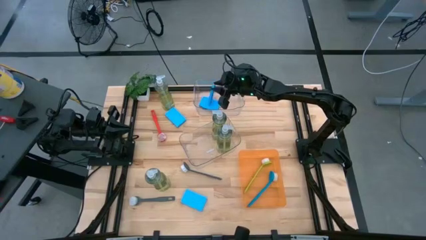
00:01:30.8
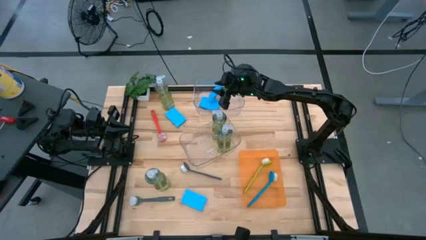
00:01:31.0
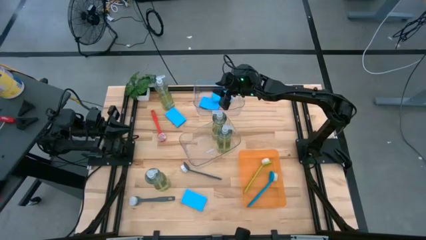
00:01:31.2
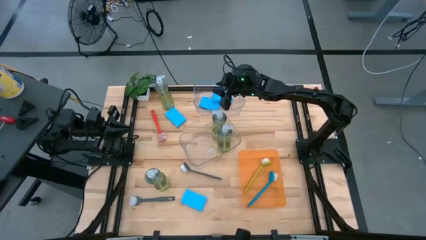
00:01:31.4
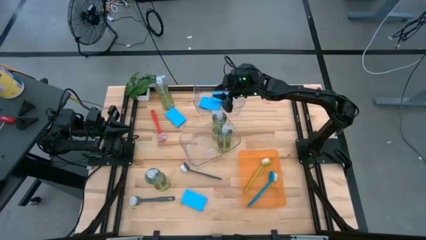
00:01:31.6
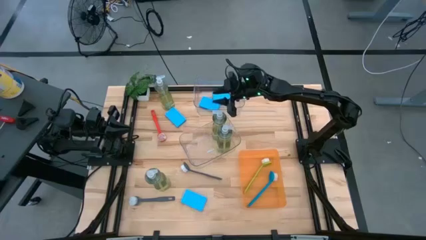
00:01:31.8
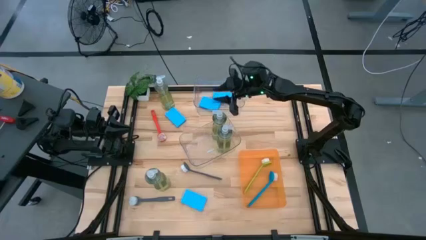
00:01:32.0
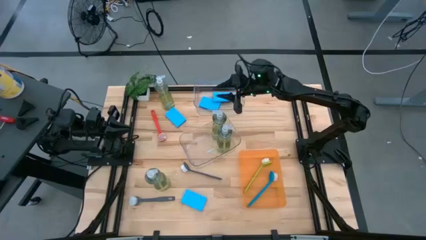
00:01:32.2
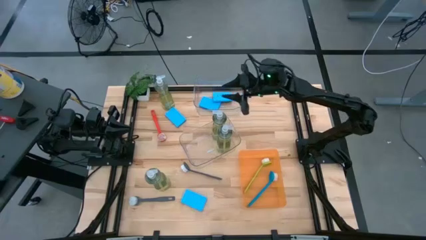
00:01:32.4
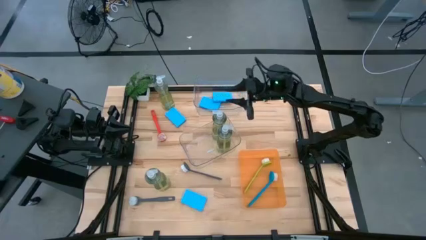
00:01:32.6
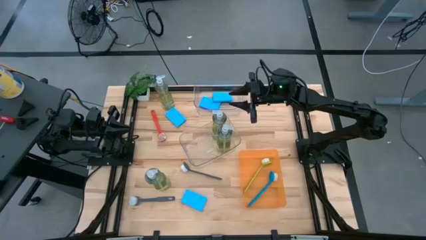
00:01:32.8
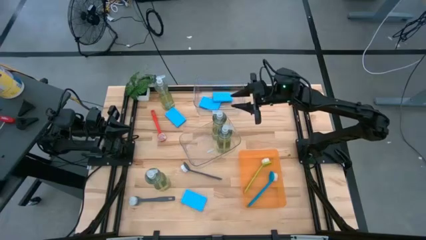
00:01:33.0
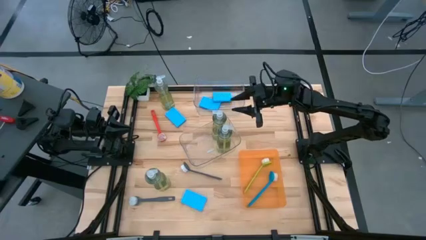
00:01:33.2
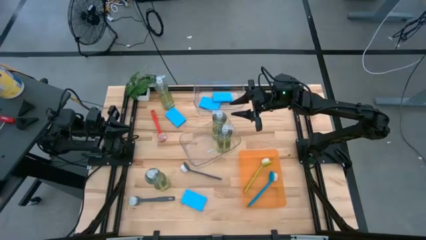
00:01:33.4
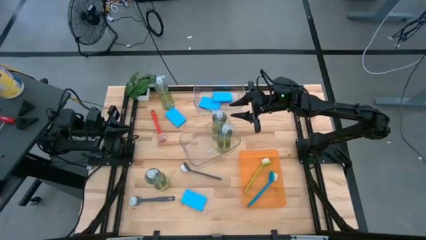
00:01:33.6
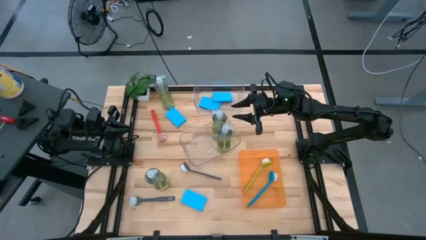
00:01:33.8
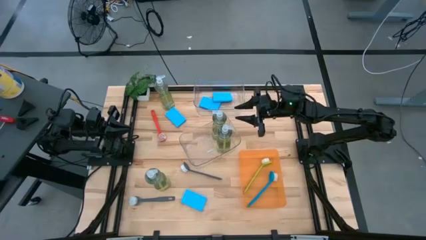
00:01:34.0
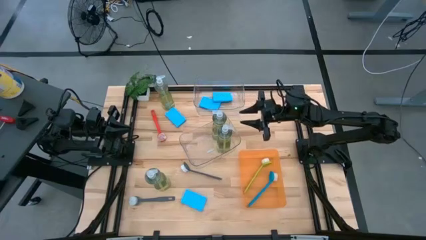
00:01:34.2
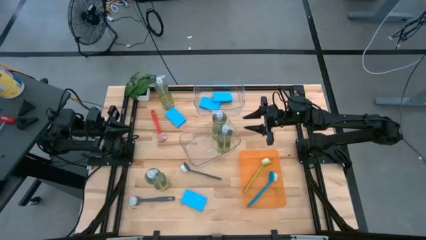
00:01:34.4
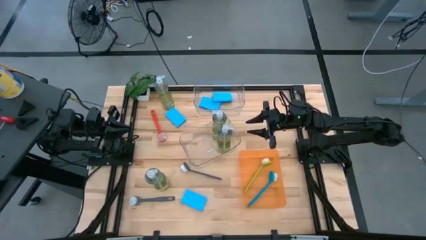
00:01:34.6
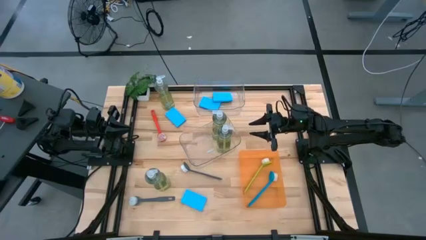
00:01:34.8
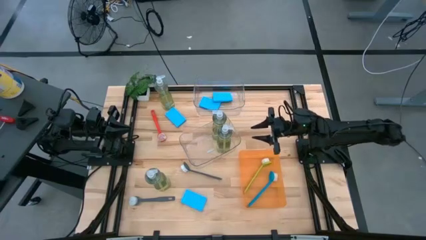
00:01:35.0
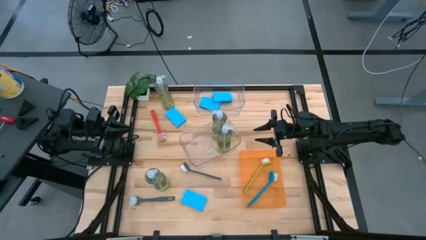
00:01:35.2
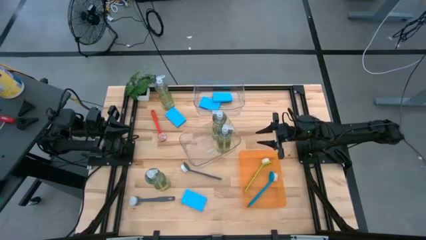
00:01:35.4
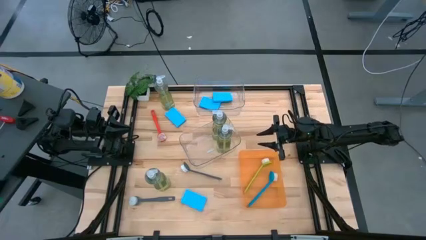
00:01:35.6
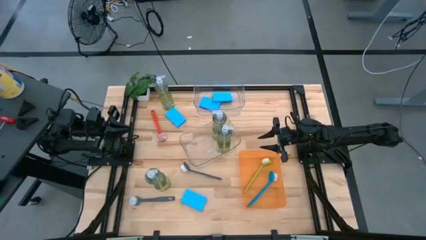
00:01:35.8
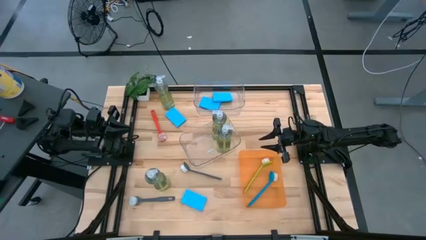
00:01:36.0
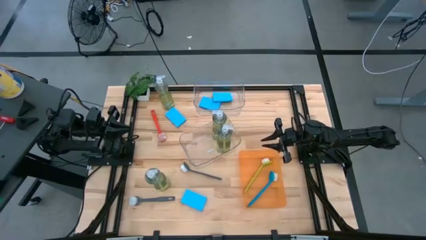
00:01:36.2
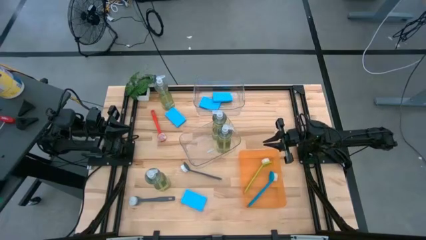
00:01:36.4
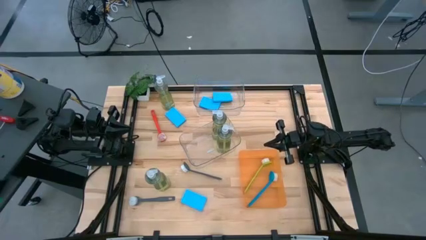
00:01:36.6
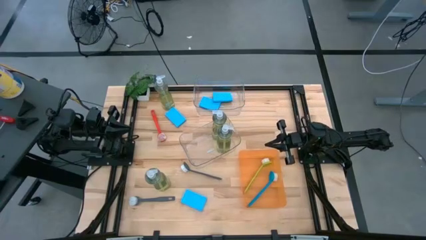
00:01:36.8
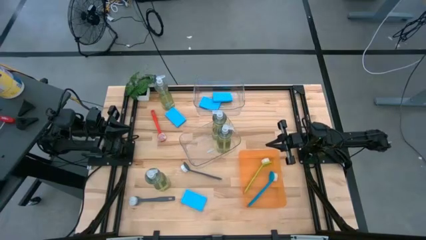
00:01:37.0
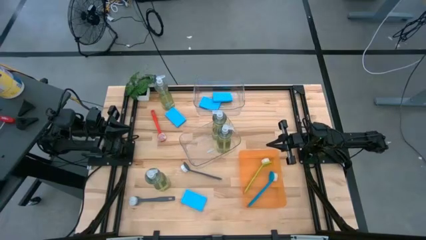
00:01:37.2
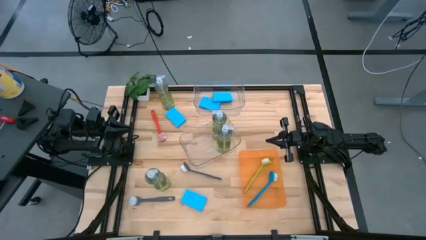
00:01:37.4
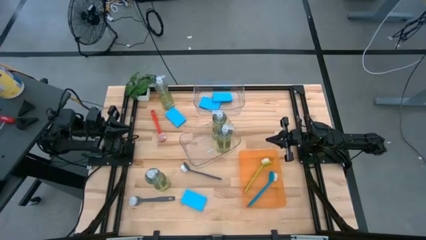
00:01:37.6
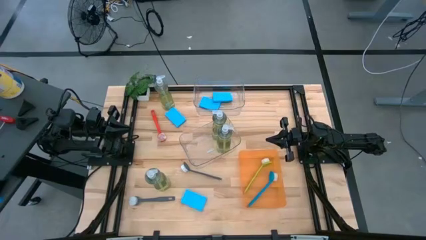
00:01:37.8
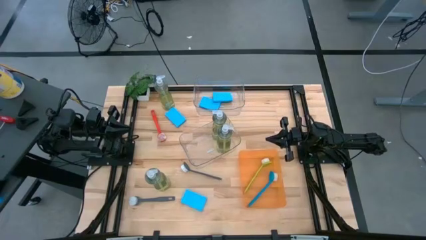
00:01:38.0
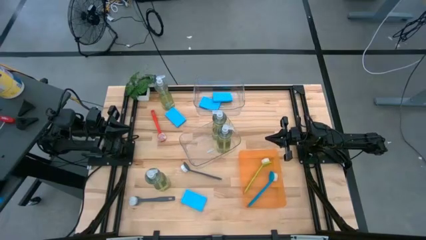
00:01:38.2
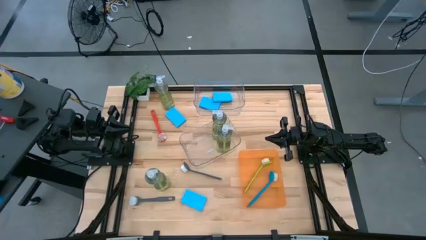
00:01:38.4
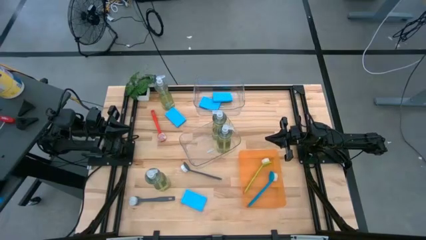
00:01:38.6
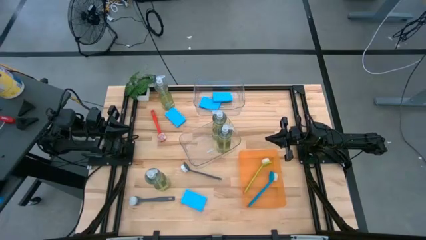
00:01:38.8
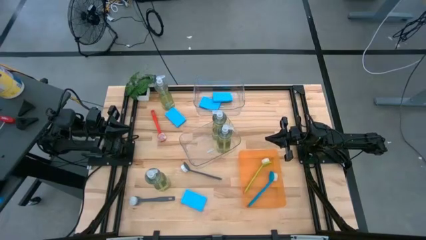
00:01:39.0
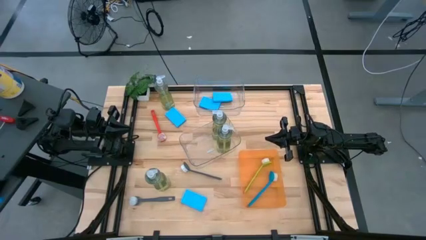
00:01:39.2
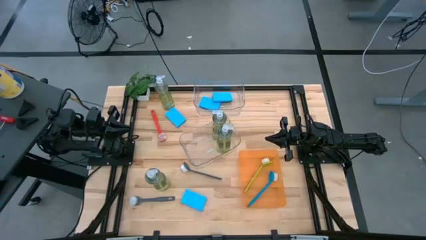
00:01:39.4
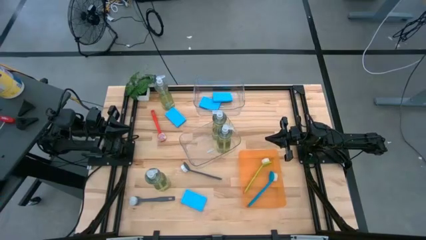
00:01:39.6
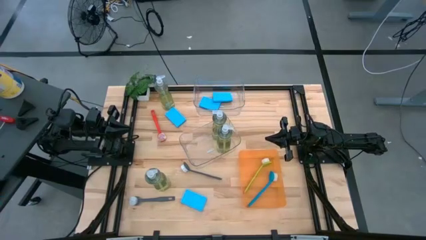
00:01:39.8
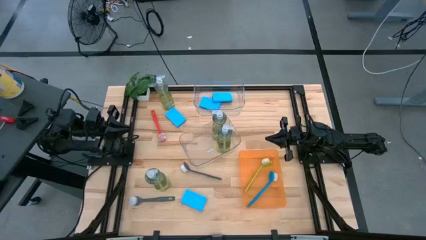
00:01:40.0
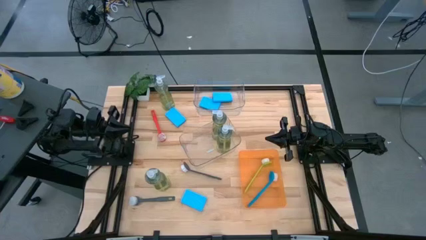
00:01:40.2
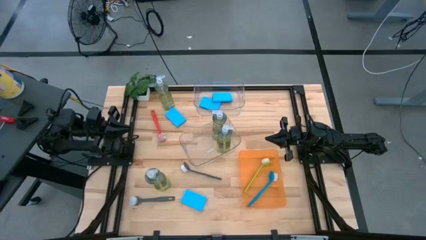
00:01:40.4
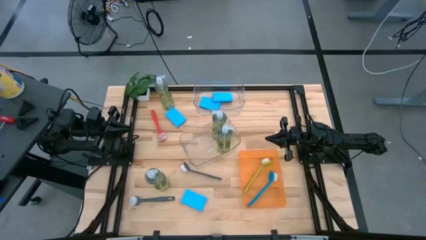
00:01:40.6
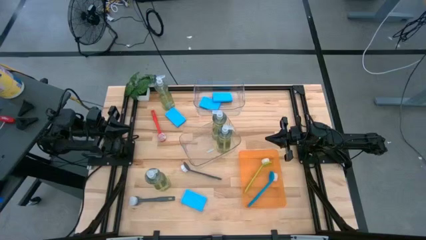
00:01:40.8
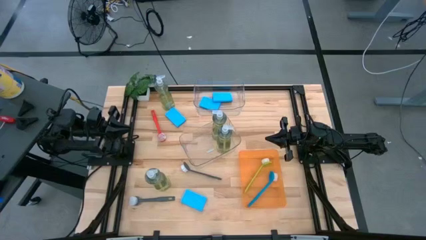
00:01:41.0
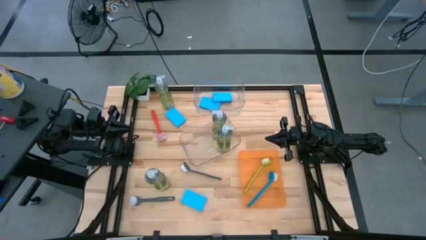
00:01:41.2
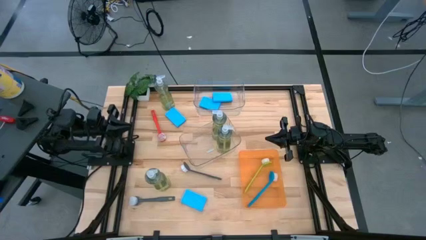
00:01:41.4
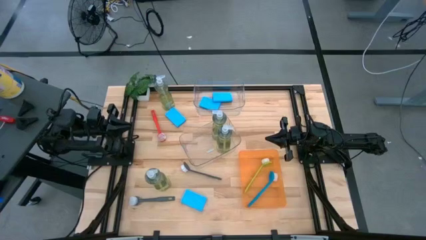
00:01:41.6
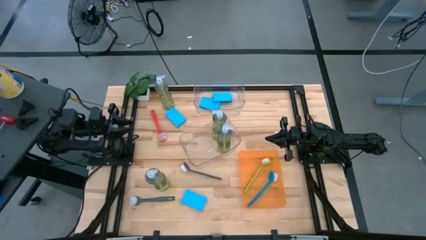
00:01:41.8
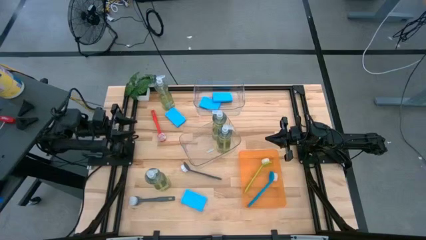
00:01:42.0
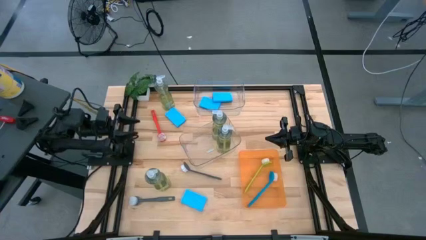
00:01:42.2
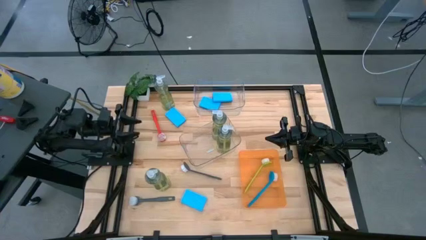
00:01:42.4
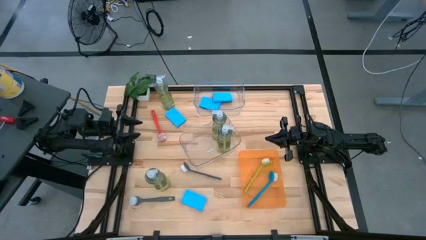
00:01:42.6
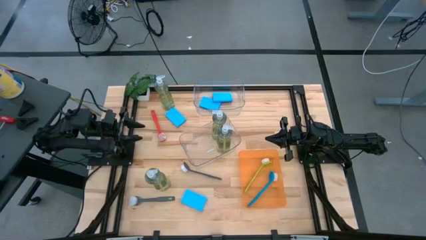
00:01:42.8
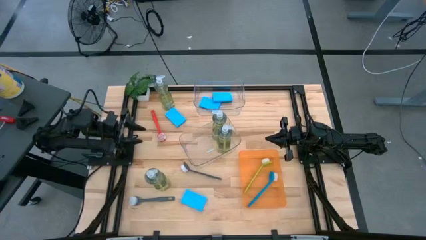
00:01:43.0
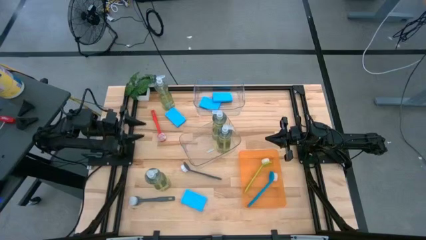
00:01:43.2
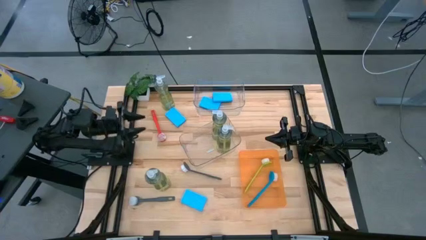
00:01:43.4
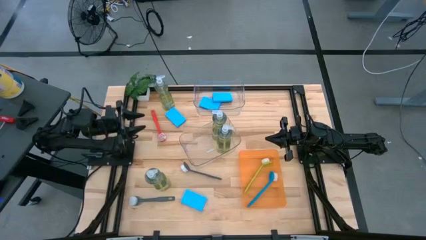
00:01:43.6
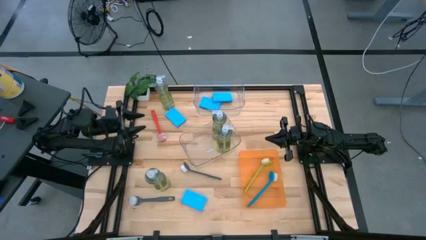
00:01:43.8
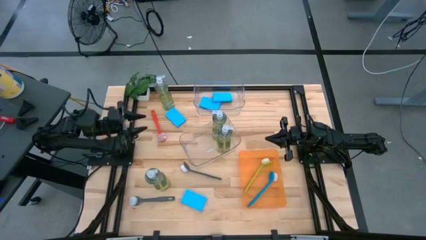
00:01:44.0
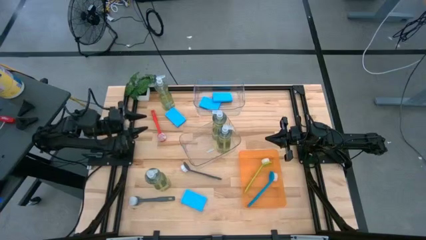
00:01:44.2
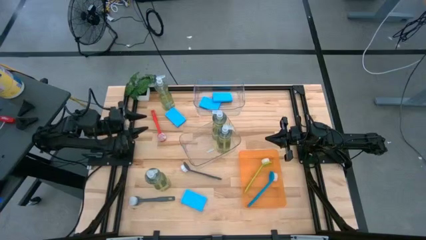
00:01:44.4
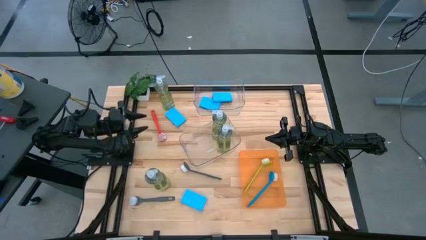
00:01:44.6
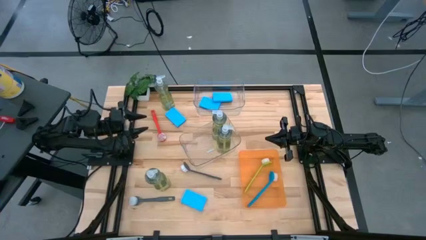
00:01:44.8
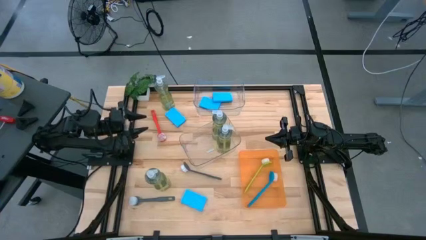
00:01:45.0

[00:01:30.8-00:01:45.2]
Task: Pick & Place Kitchen Sink Supplies
Put the green dish soap into the bottom transparent bin
